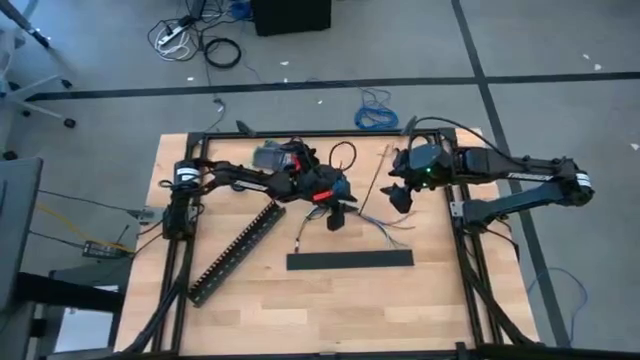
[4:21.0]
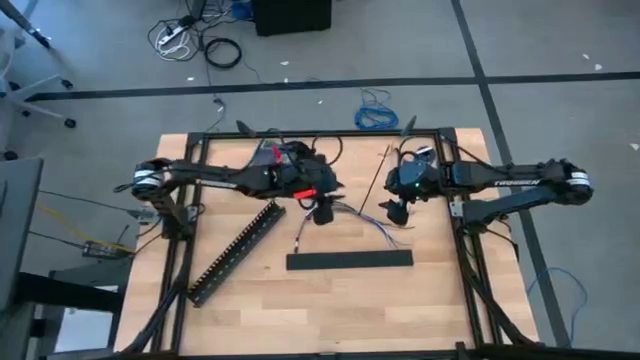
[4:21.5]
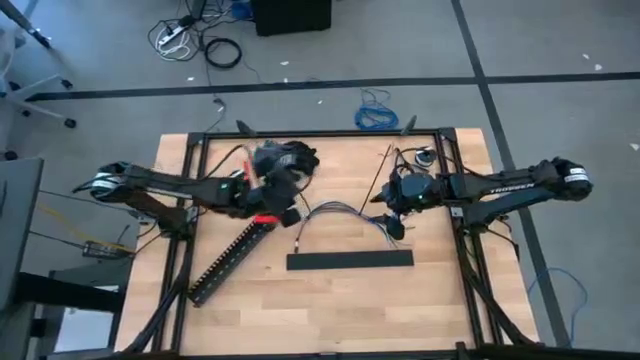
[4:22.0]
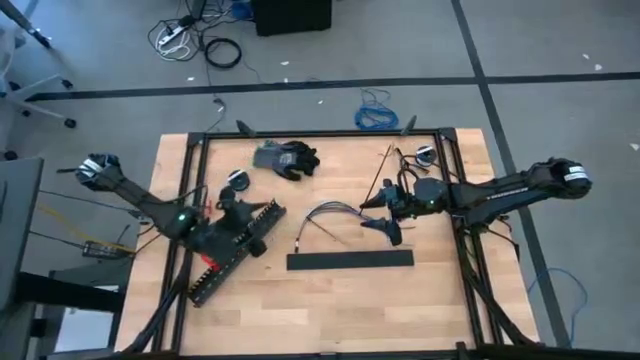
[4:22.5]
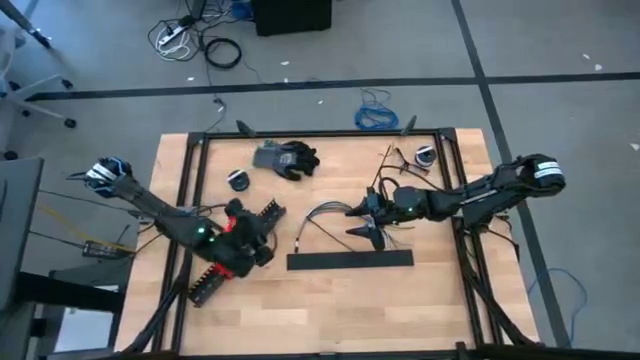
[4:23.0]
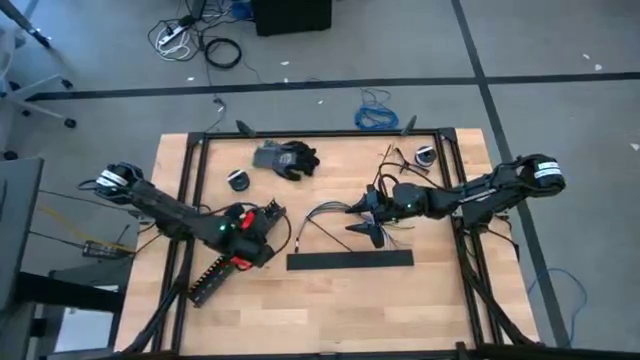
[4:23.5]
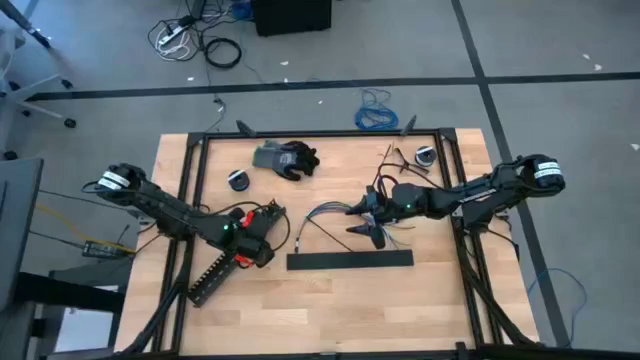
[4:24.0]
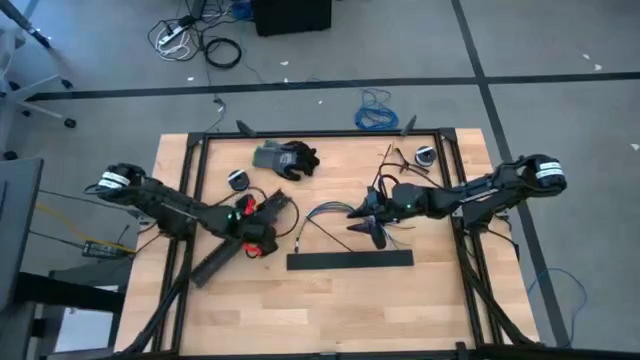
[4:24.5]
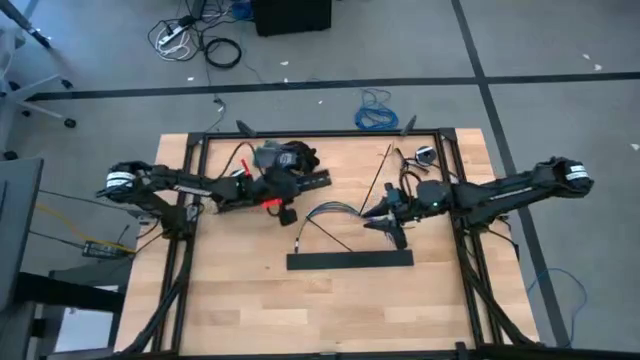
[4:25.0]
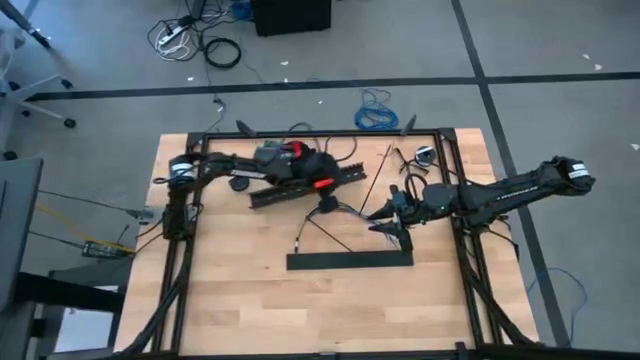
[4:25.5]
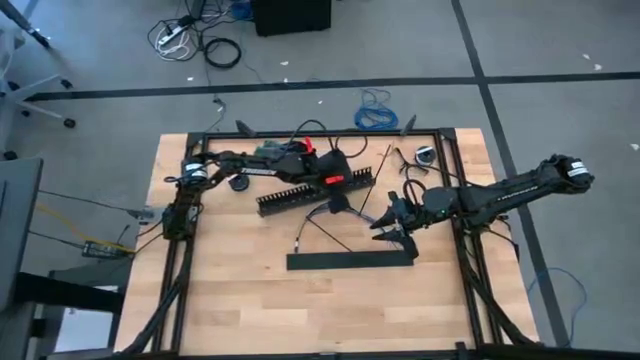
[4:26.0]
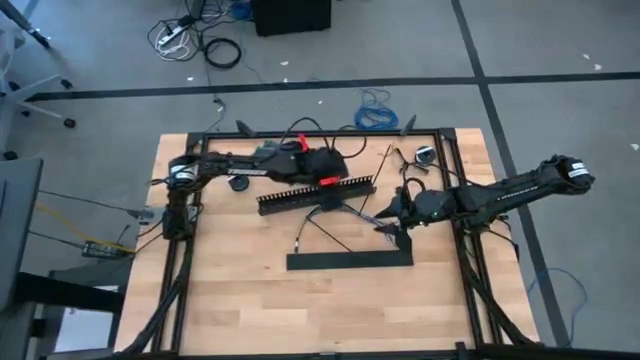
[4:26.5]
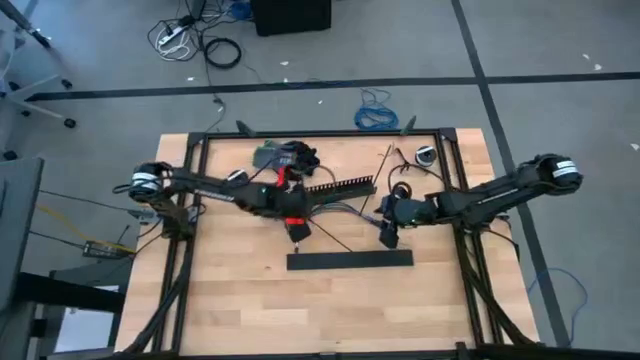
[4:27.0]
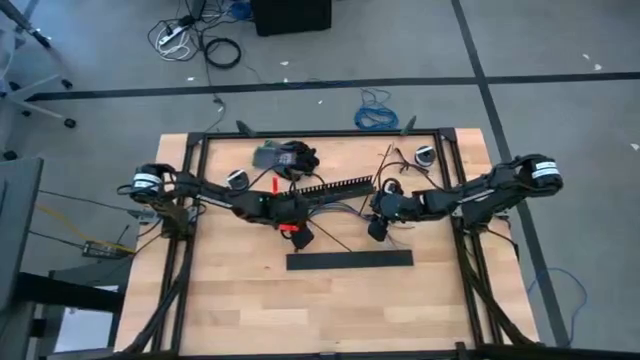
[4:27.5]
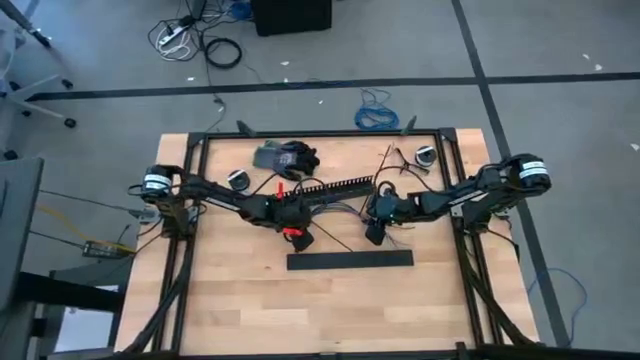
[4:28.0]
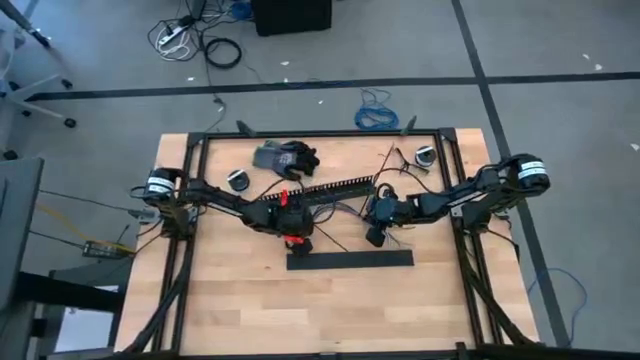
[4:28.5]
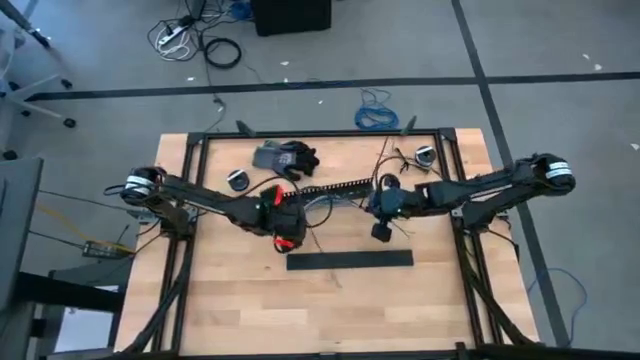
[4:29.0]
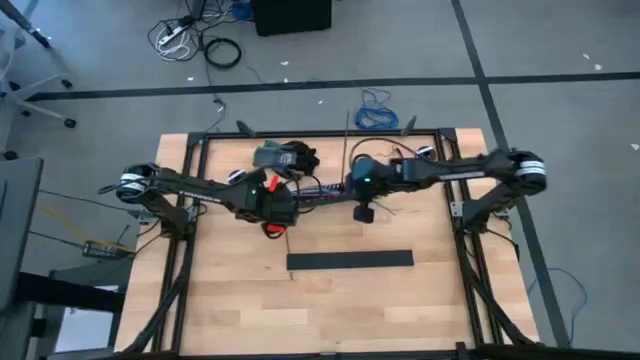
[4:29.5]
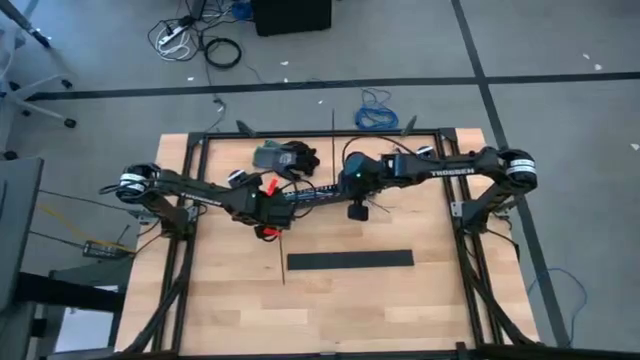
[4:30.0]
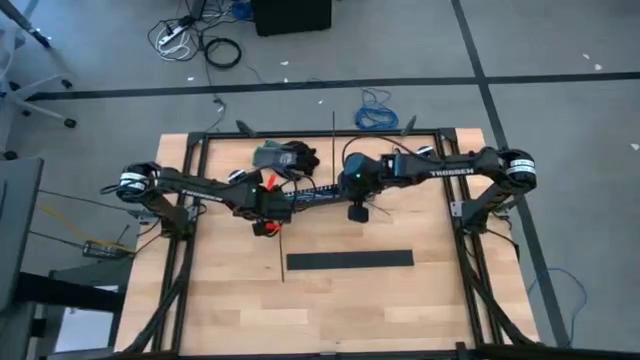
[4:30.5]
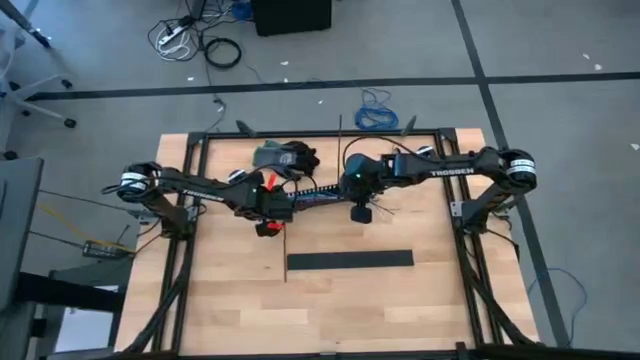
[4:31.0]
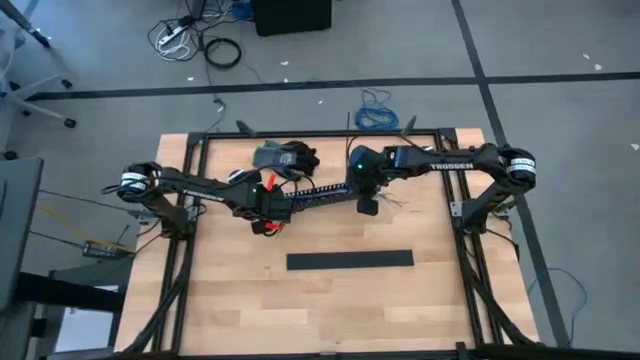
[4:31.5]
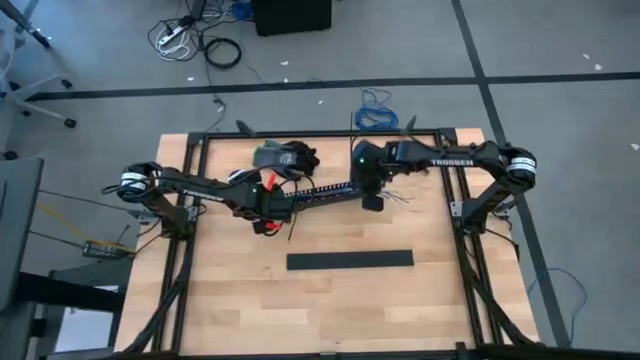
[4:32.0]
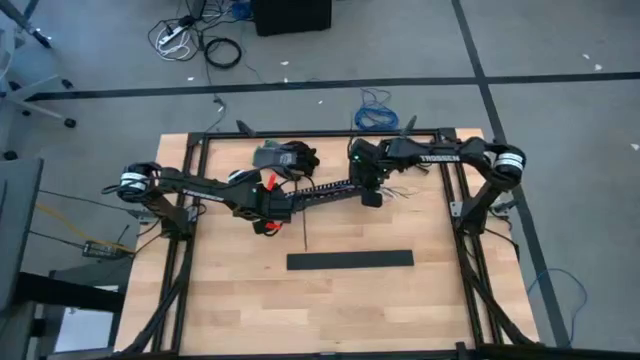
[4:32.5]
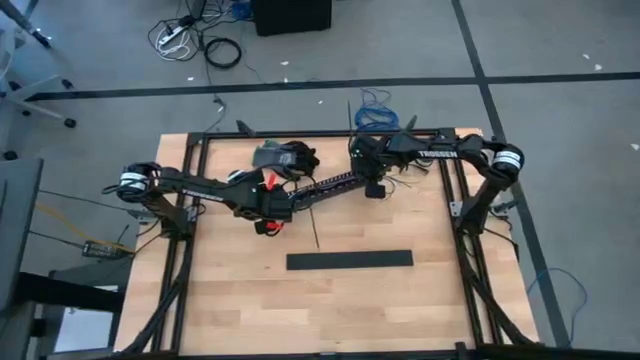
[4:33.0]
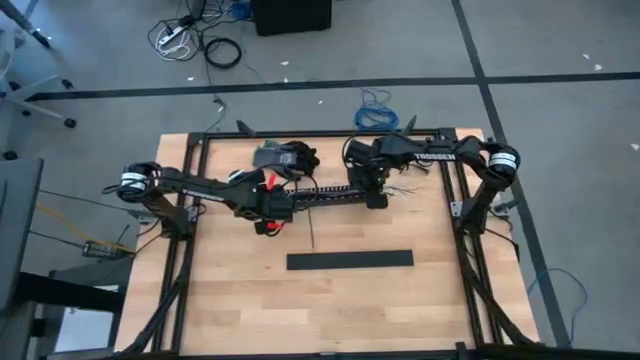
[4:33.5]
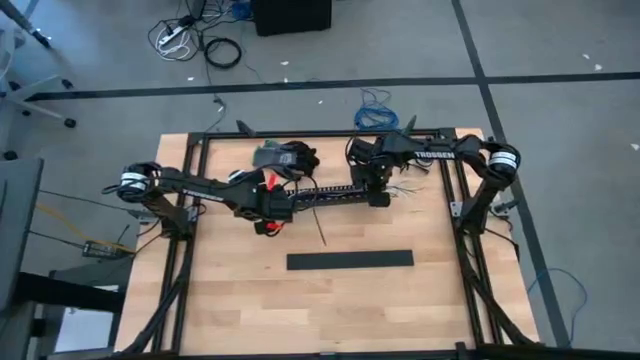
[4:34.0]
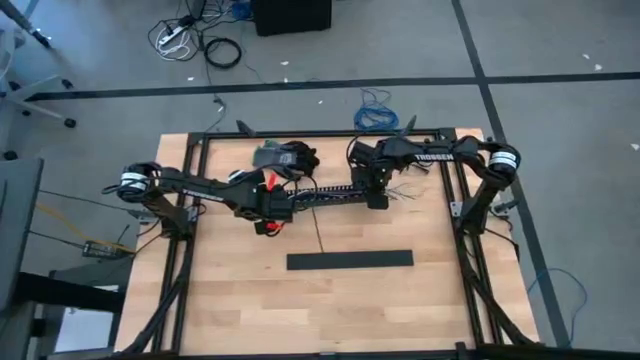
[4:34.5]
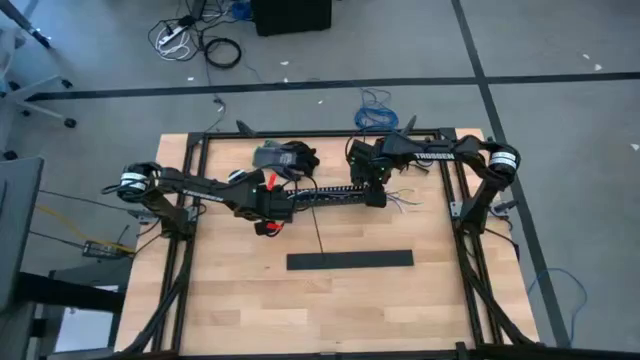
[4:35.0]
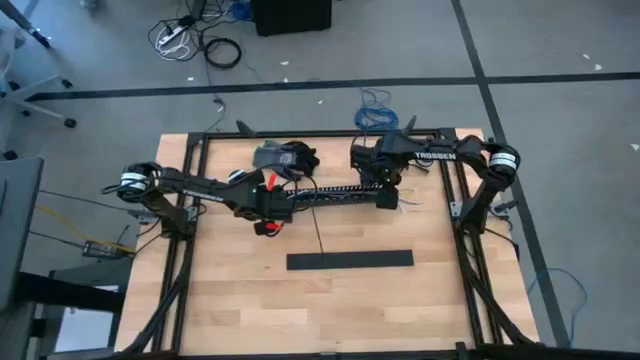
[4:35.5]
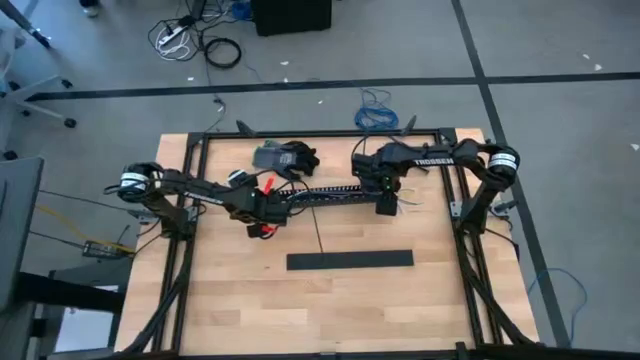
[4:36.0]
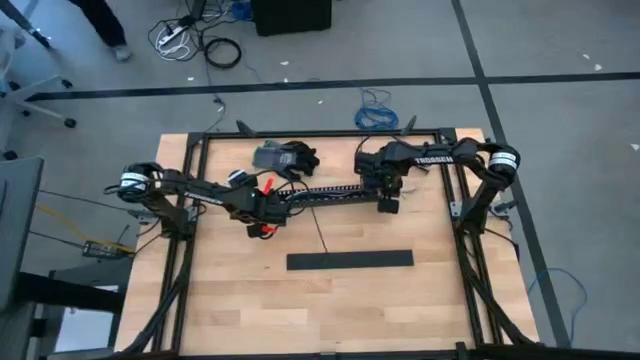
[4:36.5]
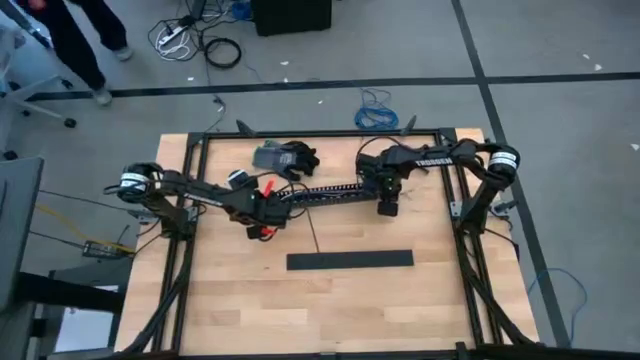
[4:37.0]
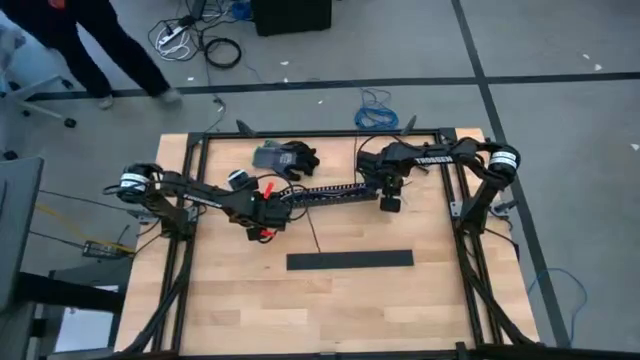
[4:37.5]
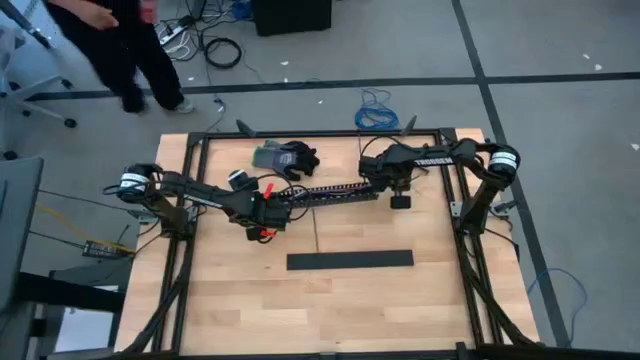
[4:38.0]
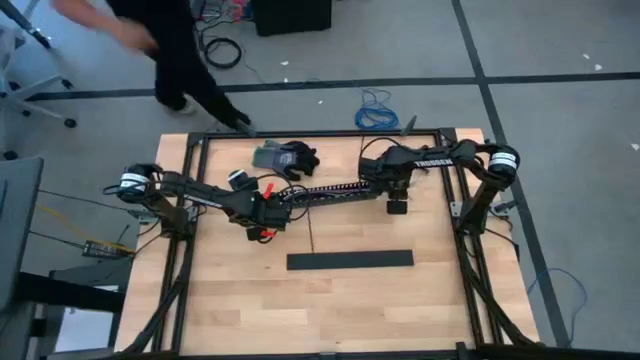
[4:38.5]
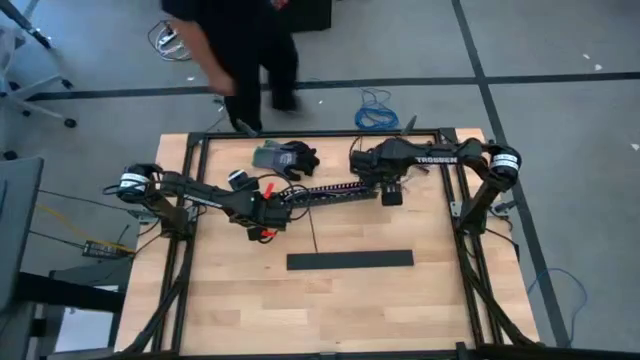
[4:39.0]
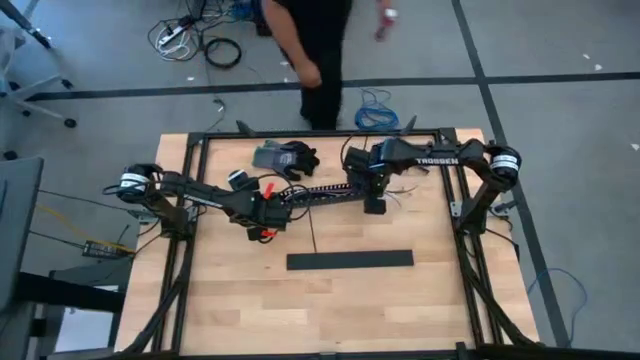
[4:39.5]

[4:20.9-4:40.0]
Task: Ziptie cables
Put the ziptied wire cables into the black cable duct
